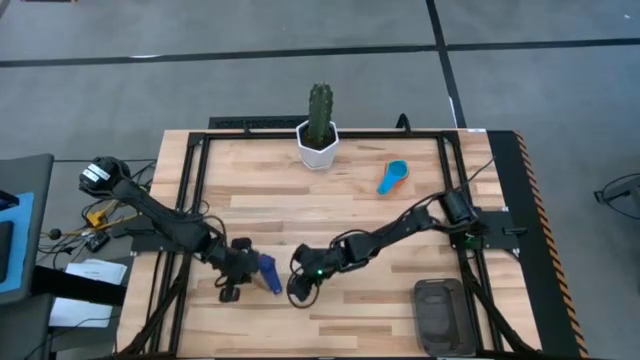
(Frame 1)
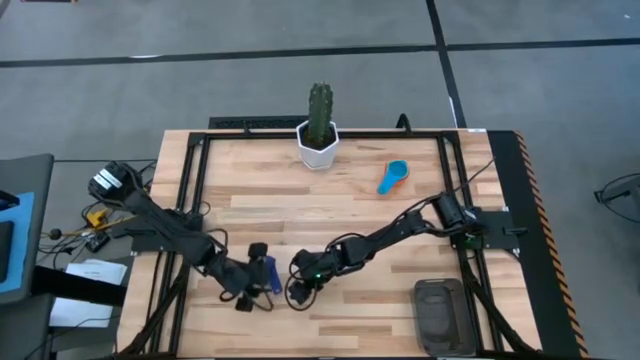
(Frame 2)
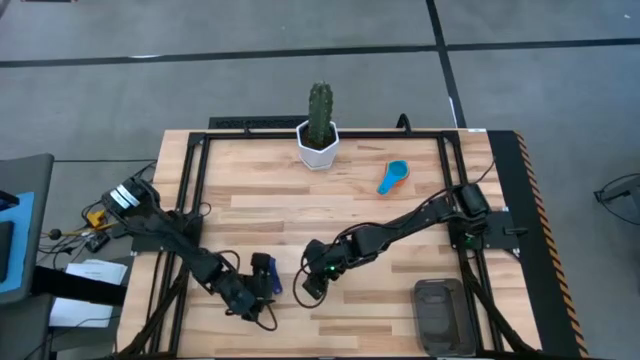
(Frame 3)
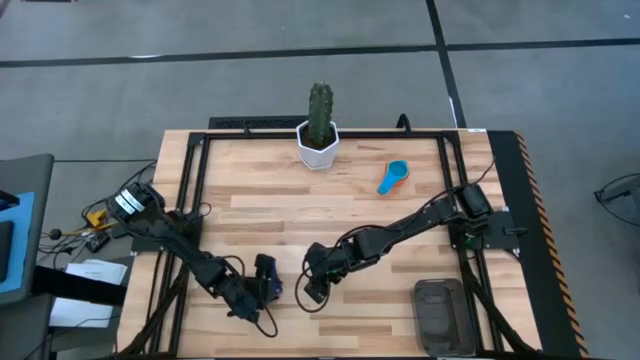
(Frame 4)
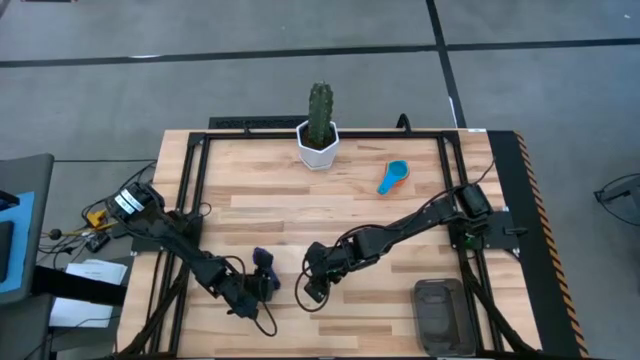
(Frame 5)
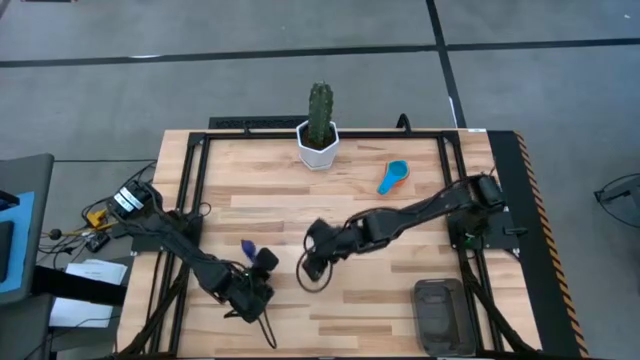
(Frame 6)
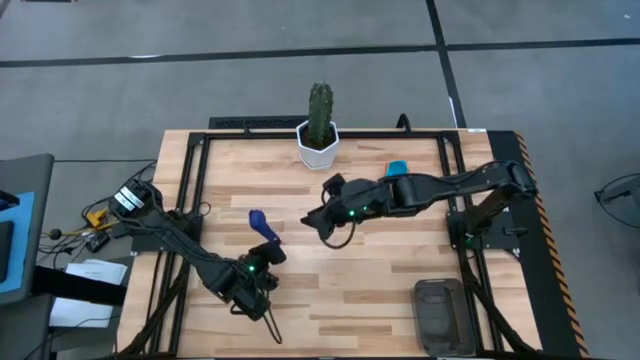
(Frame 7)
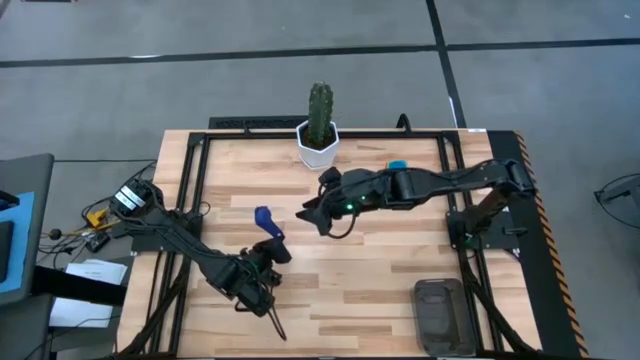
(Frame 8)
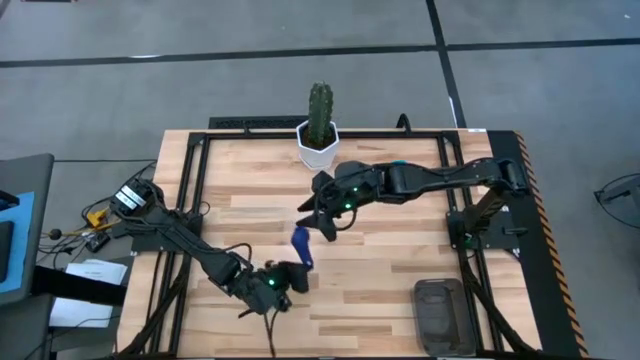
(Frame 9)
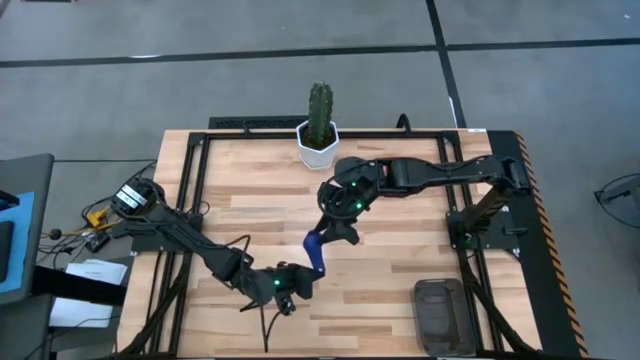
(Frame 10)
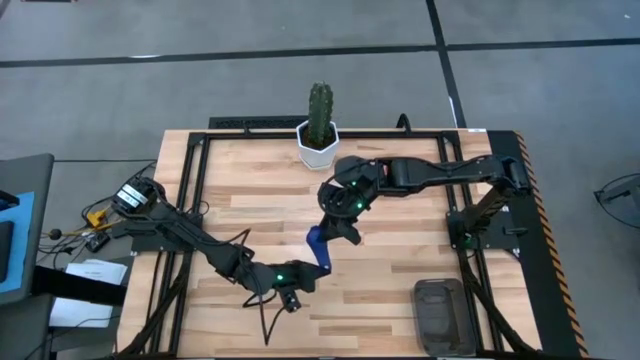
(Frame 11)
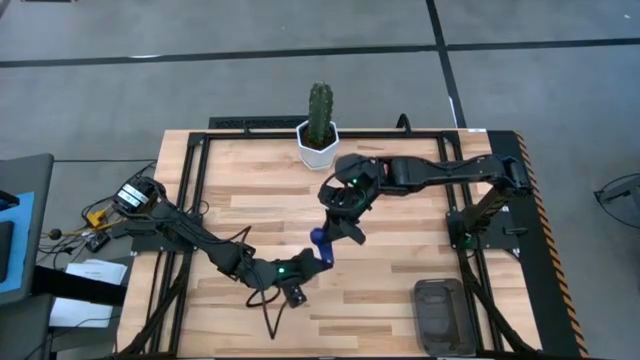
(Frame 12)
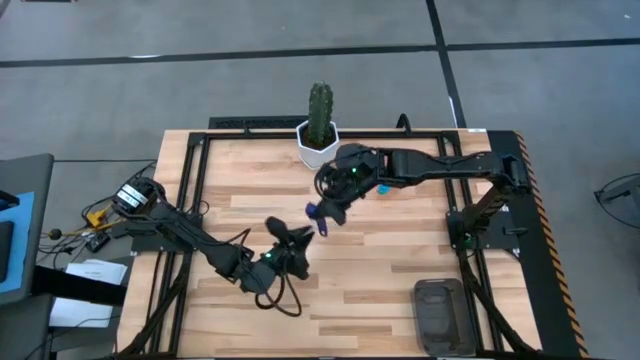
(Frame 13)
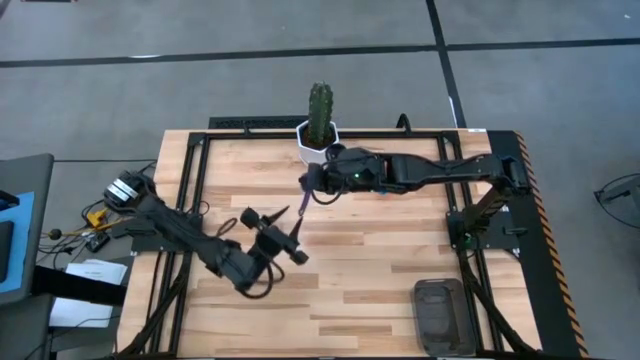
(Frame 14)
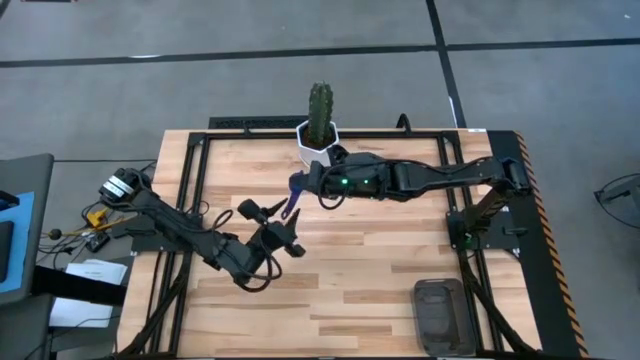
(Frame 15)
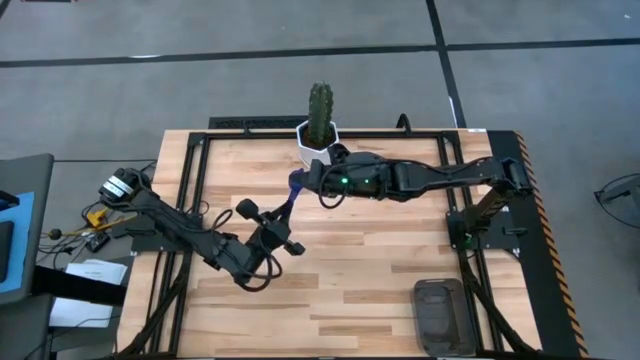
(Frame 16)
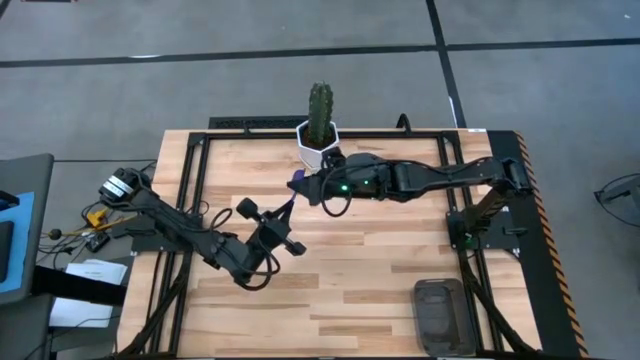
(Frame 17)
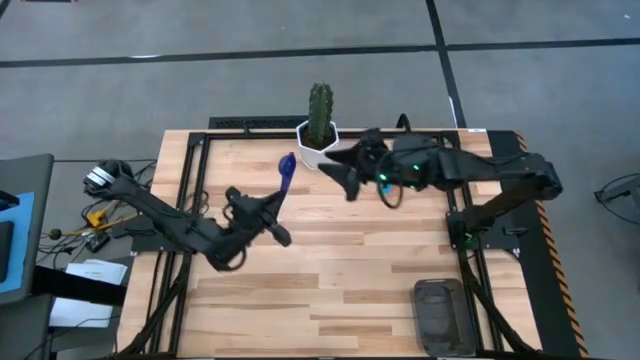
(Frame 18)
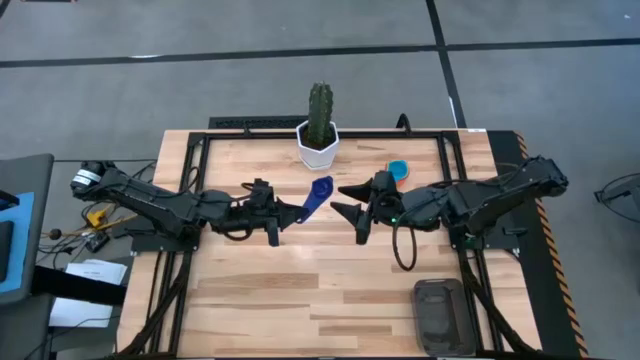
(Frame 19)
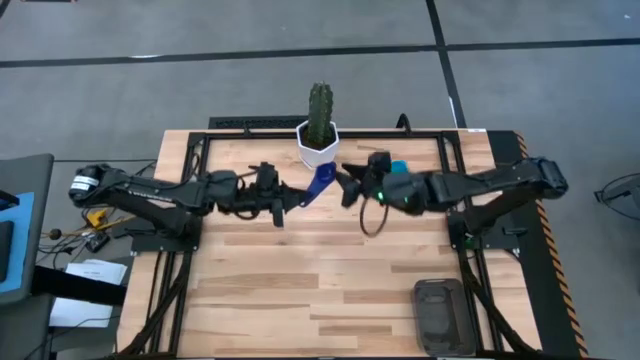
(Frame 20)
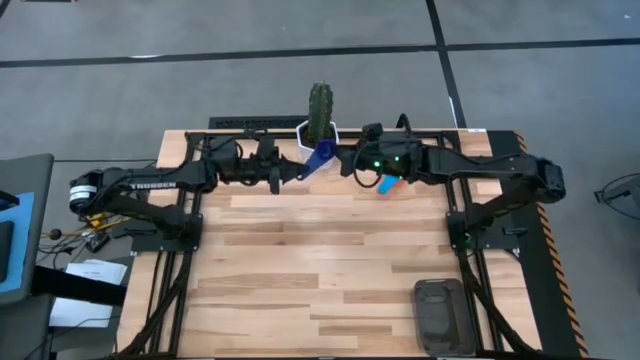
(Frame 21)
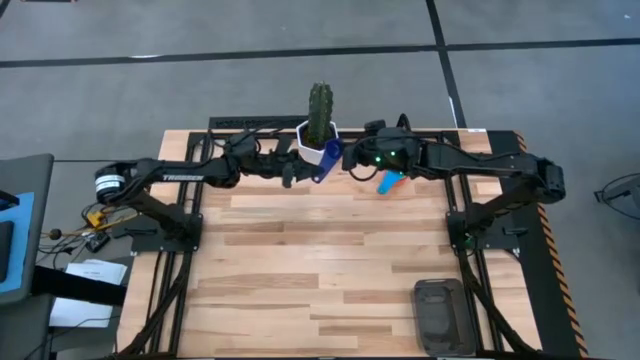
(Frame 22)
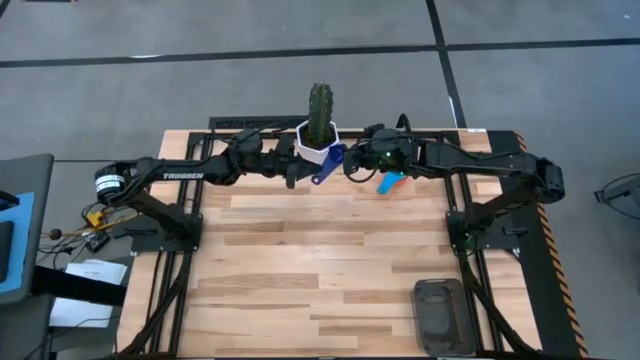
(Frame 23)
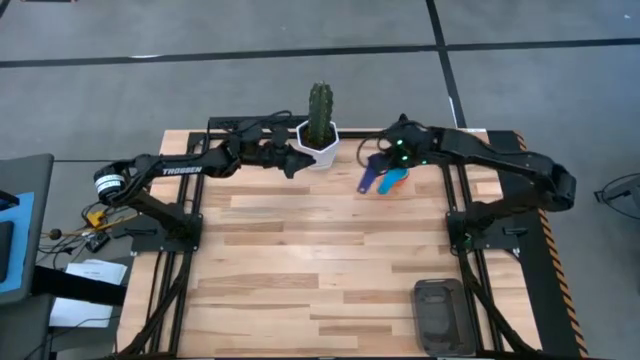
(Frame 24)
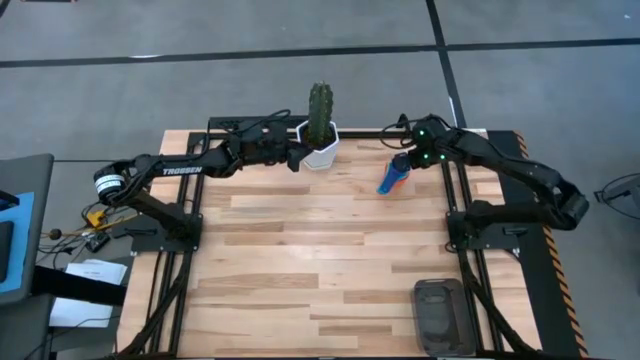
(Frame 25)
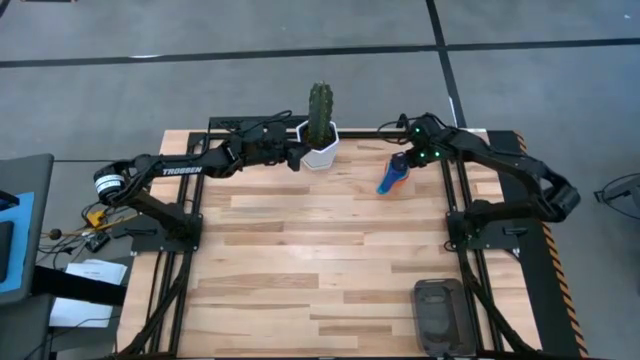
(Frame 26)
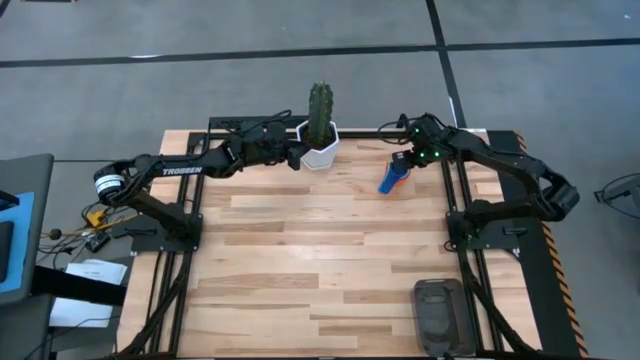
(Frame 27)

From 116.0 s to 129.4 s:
Task: Nest measuring cups in basket
Stack the violet measuring cup on top of the light blue measuring cup

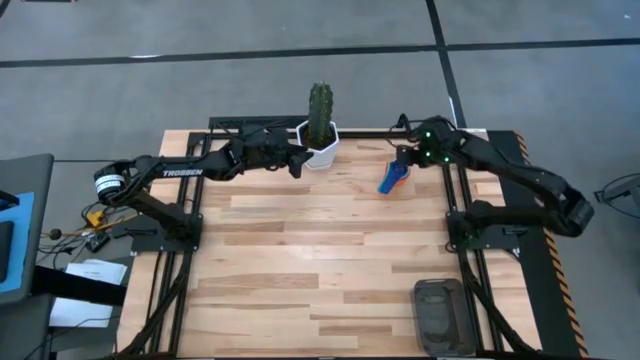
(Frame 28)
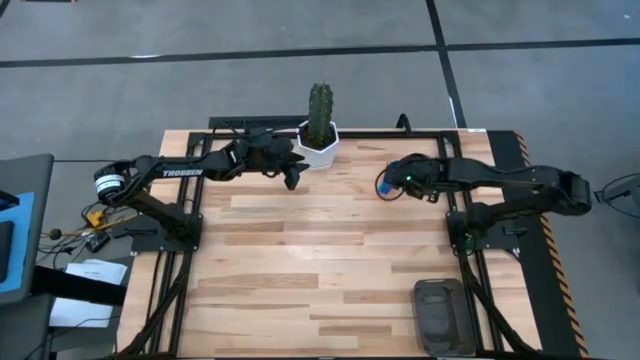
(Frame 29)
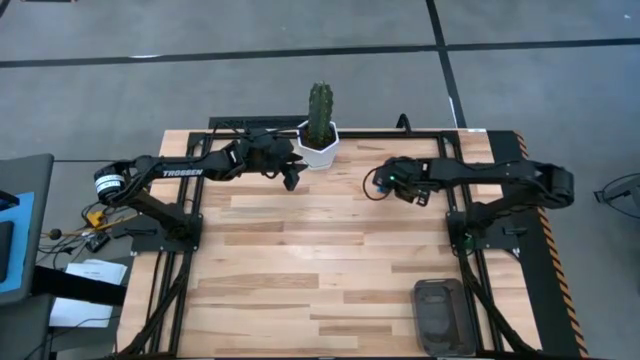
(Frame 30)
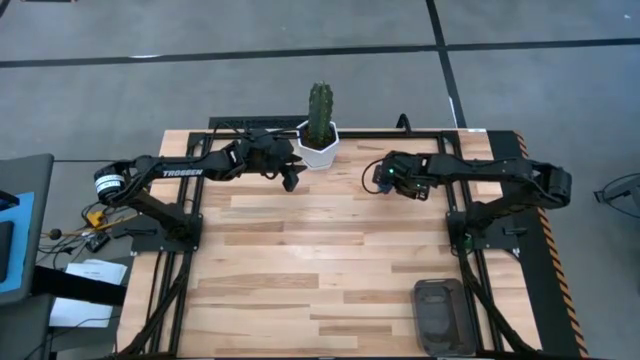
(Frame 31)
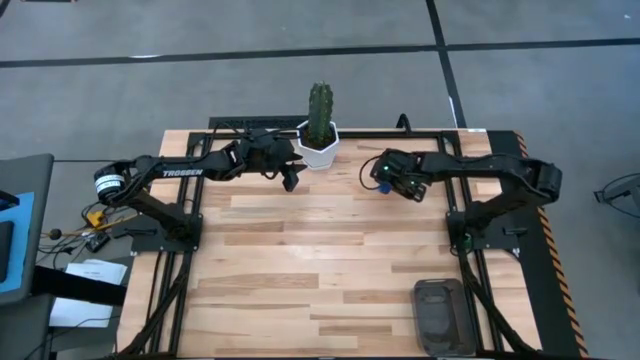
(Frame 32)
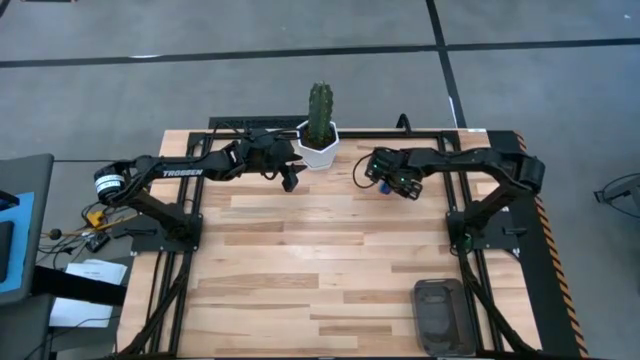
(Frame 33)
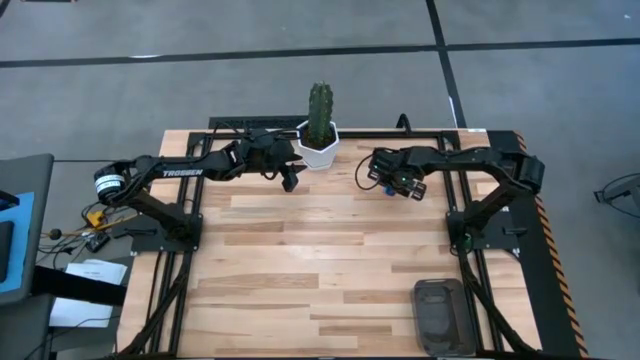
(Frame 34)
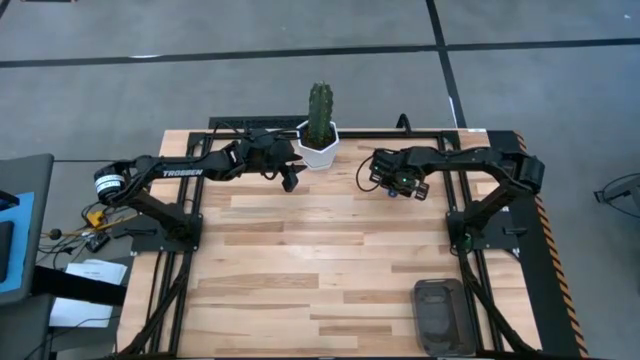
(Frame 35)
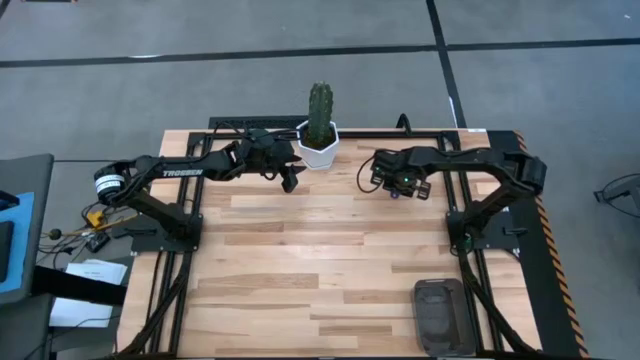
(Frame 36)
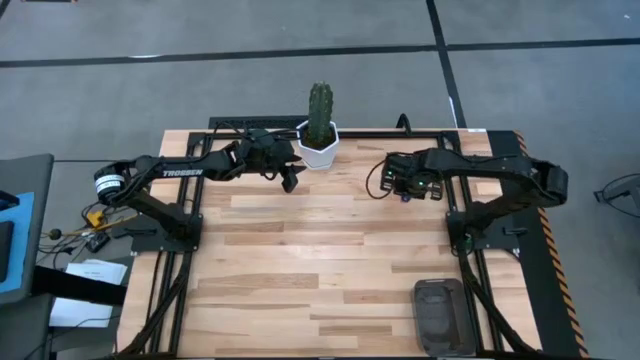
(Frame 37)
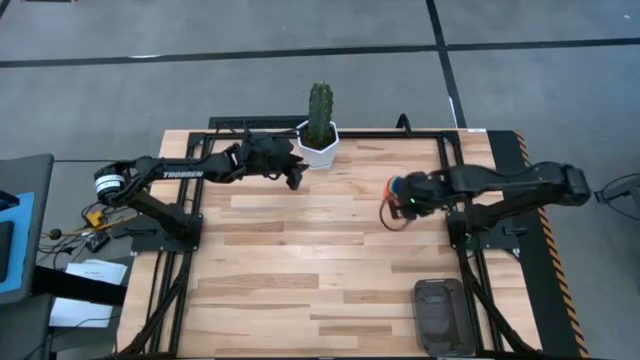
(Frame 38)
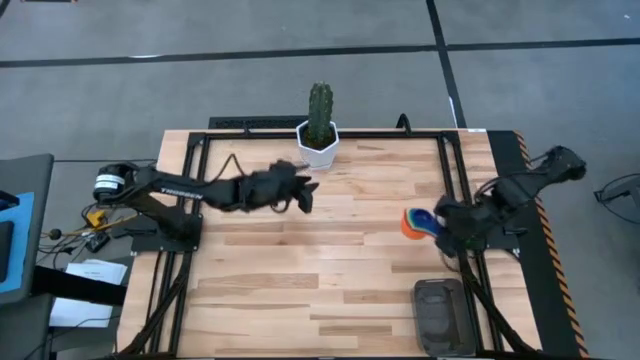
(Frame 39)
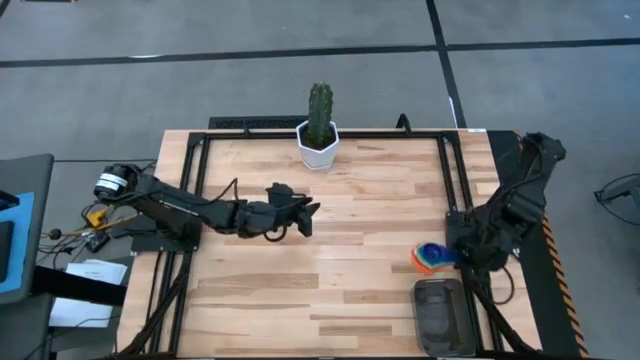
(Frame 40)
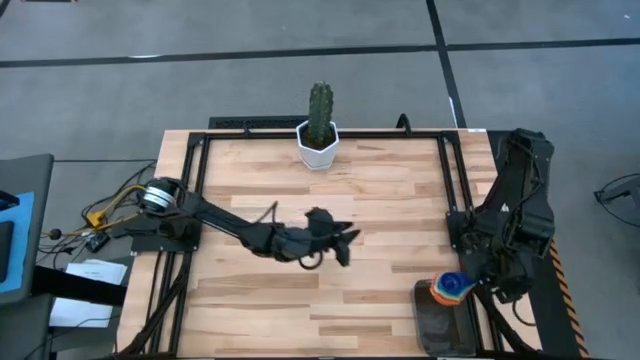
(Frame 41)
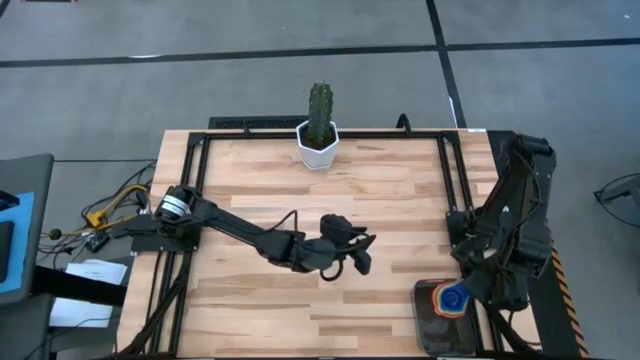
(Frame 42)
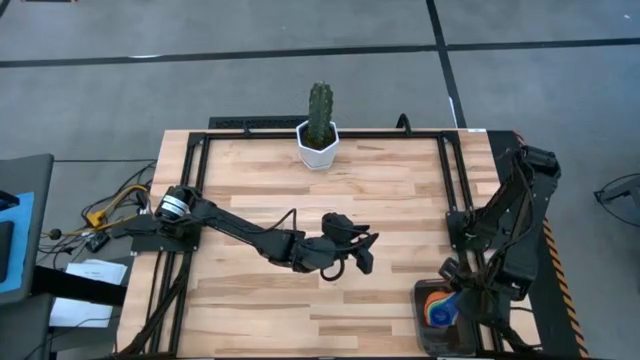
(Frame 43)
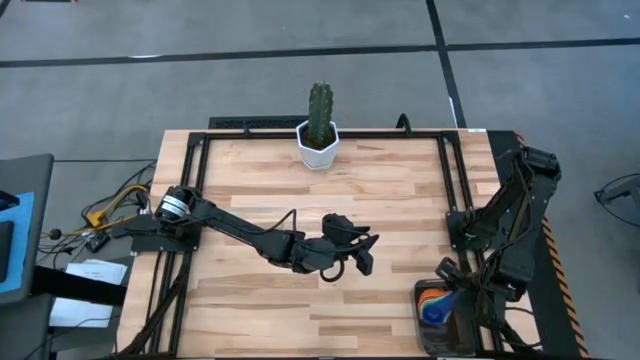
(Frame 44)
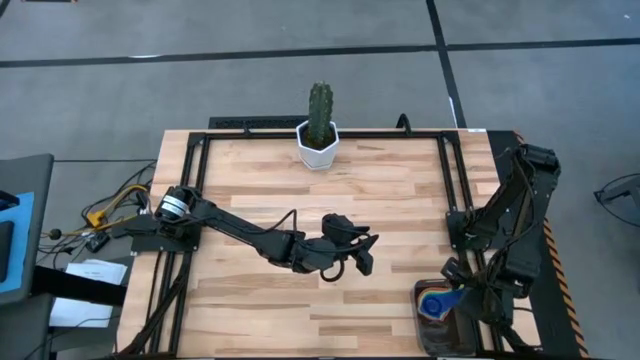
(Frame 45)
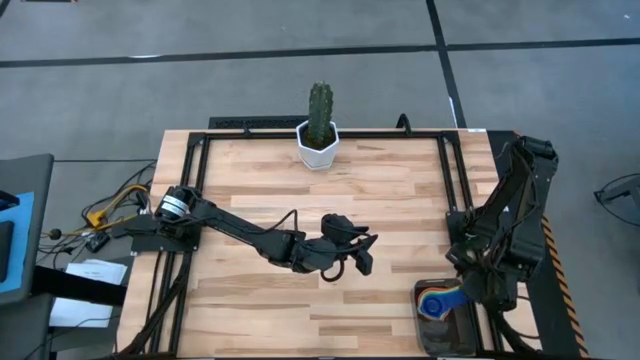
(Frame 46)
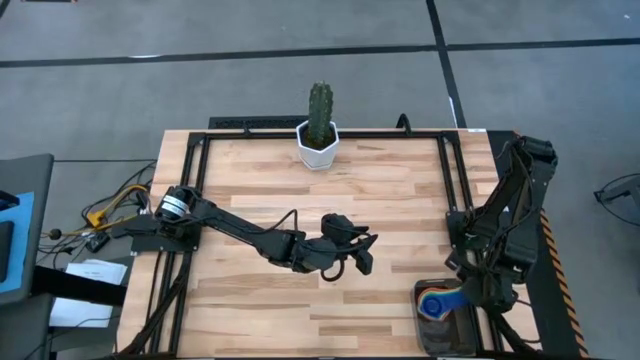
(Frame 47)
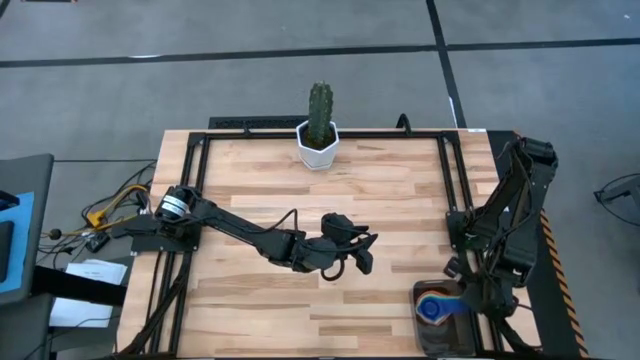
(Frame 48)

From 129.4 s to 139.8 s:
Put the nested measuring cups into the black bin
